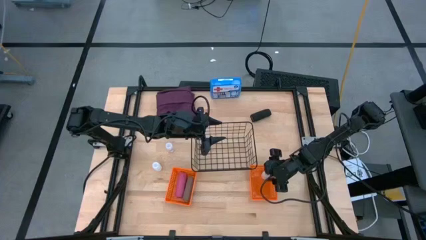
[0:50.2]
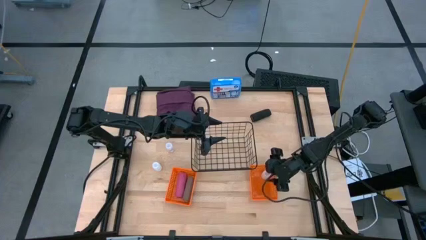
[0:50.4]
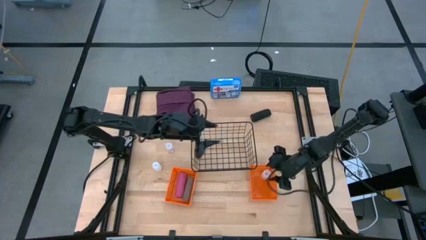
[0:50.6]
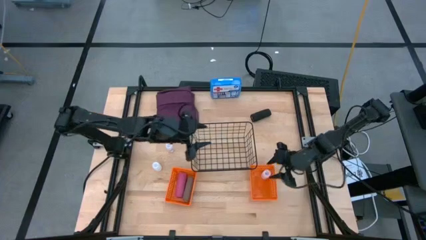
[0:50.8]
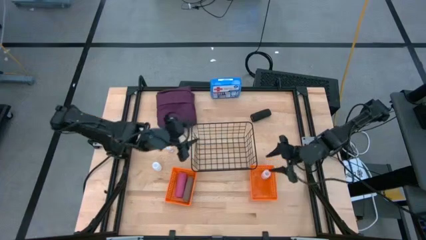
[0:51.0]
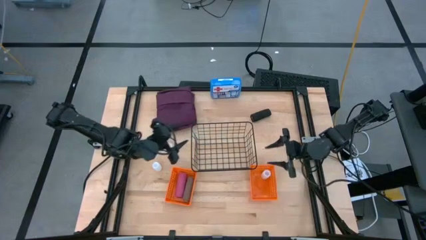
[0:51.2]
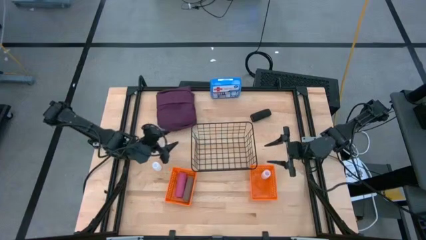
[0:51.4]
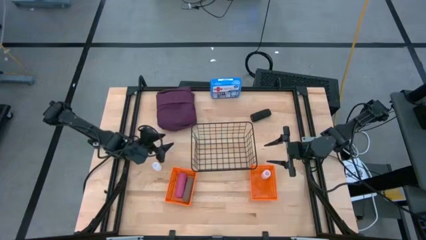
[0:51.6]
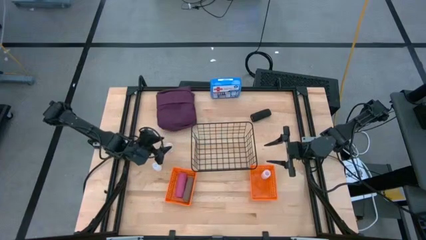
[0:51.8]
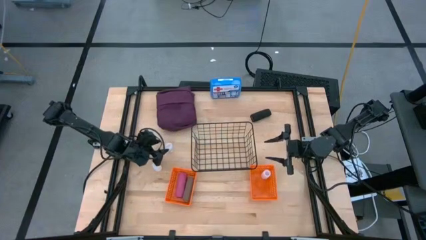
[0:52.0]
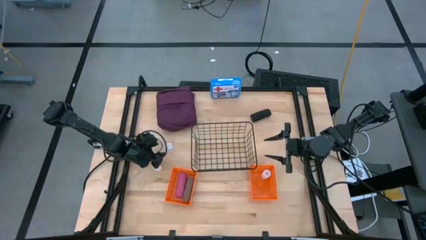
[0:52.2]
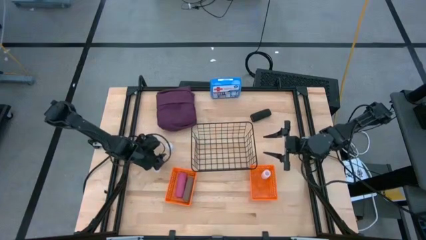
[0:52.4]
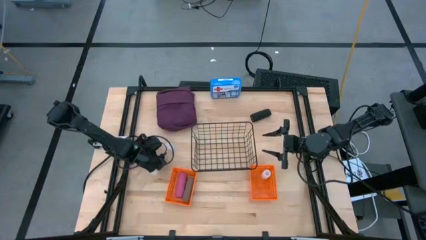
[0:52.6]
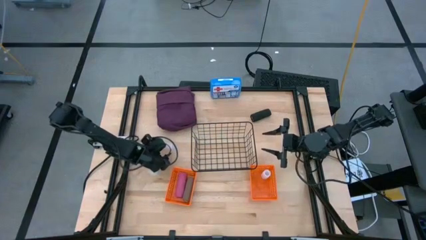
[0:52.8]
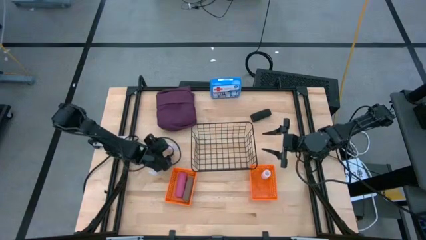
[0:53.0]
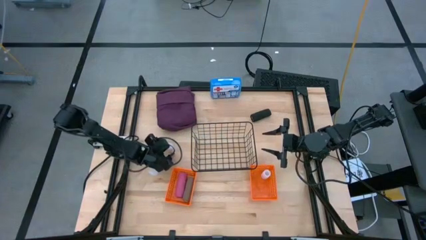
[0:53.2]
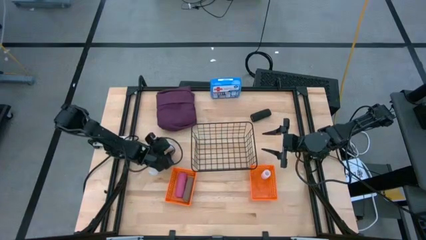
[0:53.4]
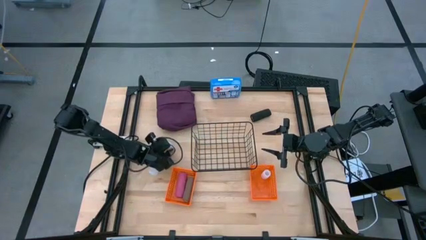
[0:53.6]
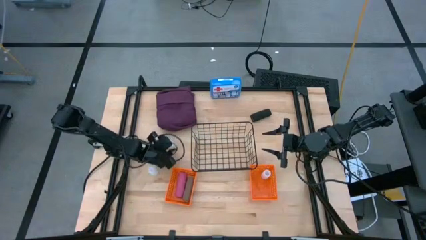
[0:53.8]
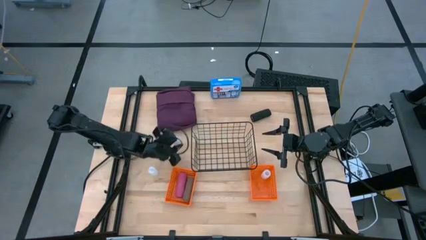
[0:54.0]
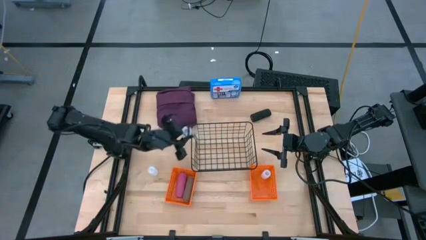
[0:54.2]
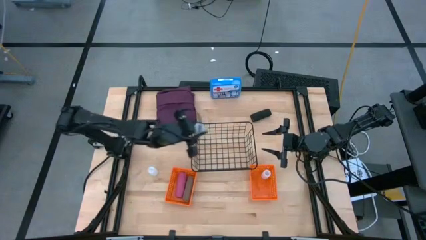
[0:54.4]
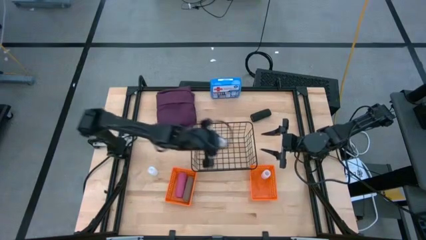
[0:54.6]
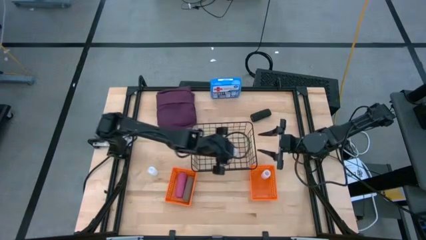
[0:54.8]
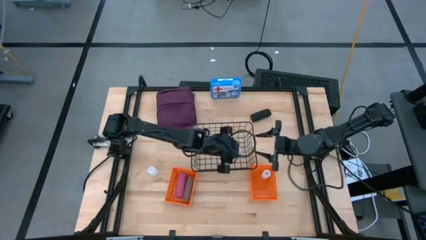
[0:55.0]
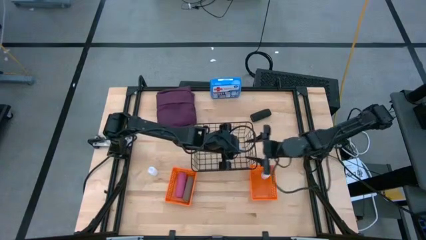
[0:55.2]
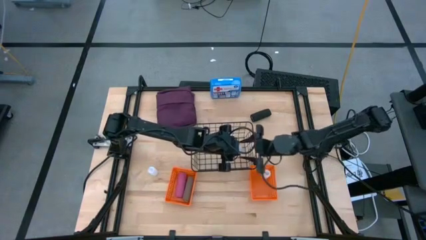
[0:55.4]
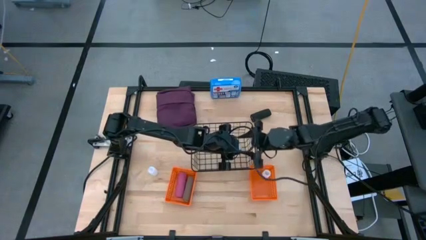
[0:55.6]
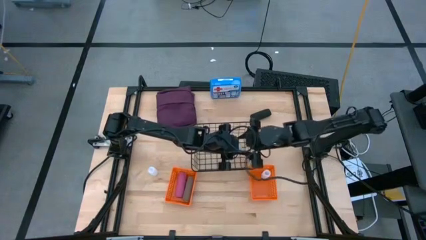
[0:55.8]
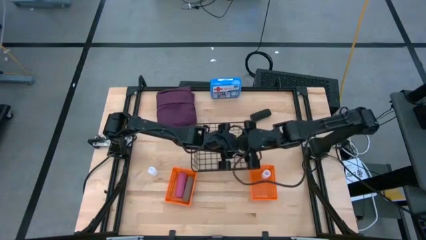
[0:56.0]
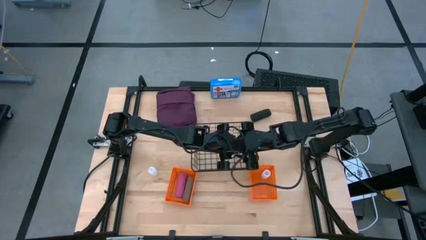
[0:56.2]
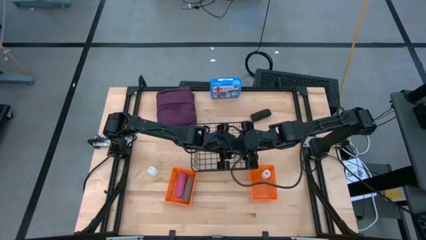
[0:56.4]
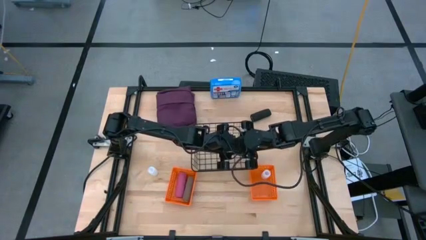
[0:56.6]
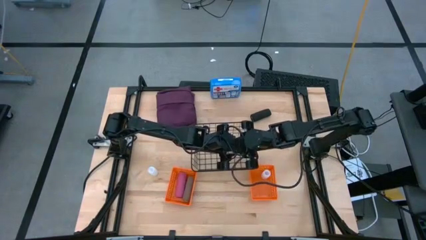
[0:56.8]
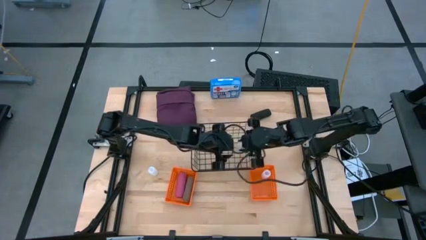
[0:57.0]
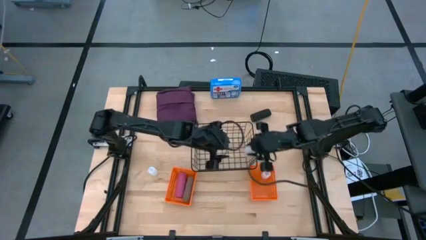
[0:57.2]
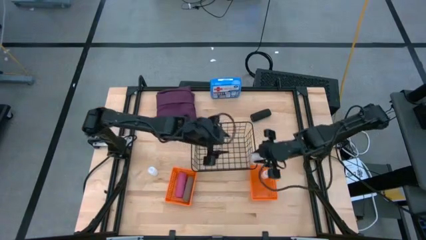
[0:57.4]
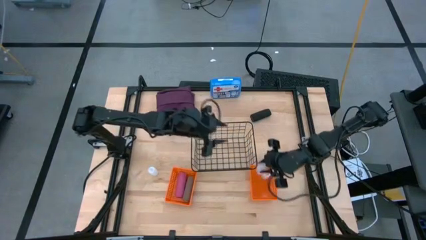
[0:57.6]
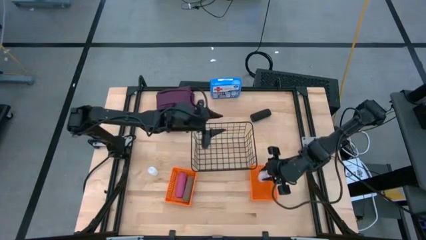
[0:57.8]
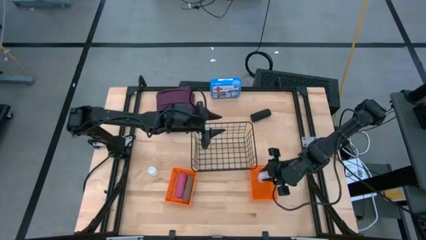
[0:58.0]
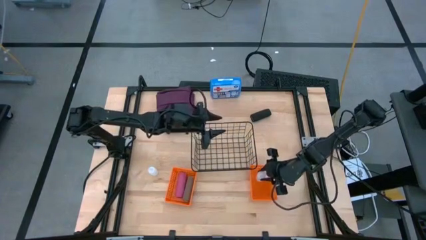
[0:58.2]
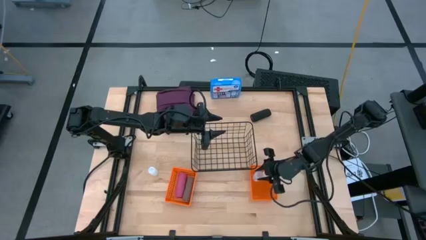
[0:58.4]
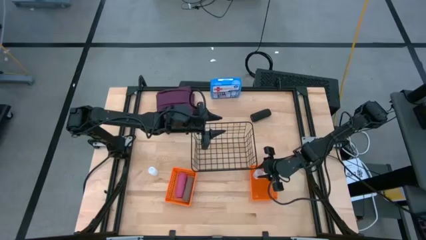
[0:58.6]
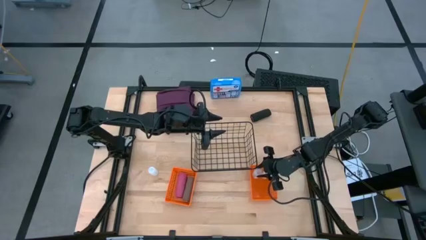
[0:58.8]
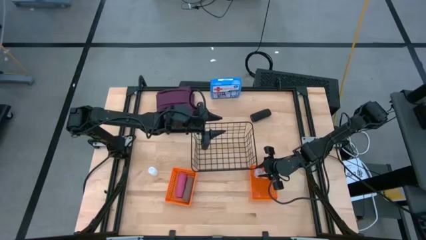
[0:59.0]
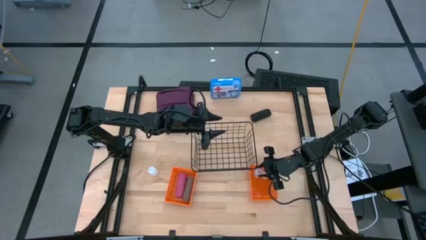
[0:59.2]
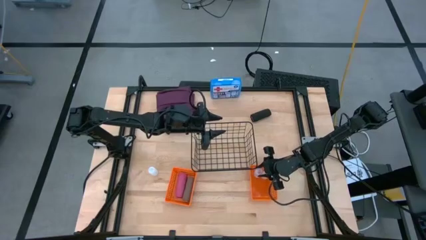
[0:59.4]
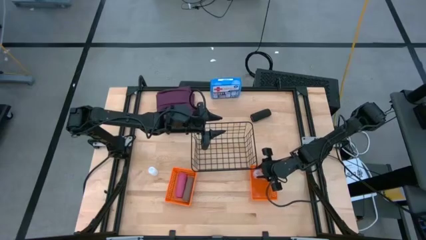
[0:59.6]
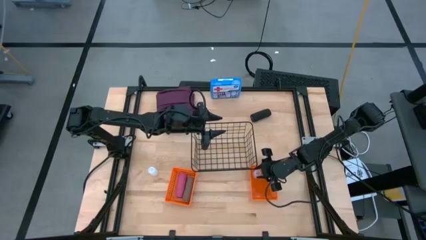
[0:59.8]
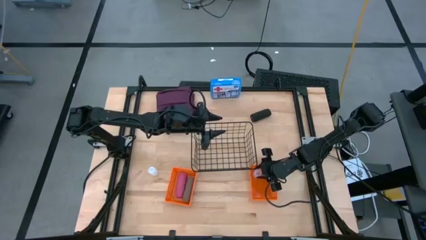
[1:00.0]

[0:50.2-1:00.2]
Task: Pick & Place Medicine items
Put the top white pill bottle into the right orange basket

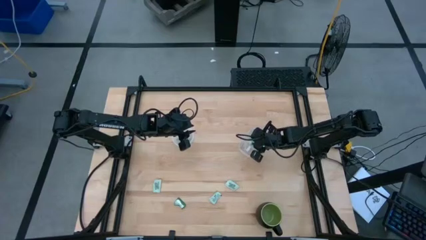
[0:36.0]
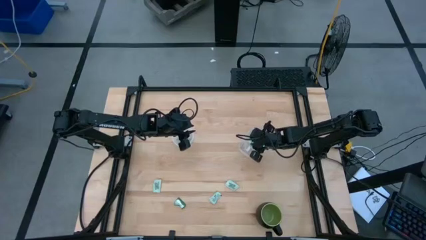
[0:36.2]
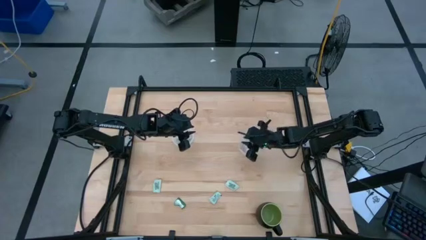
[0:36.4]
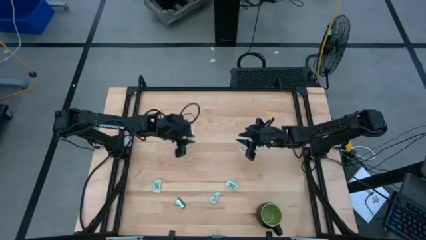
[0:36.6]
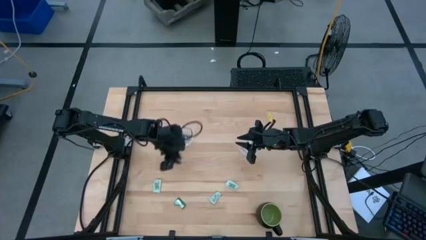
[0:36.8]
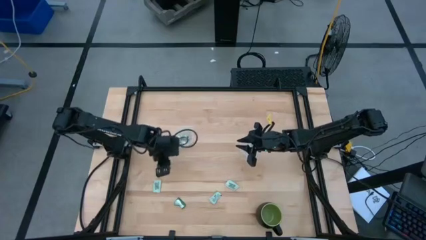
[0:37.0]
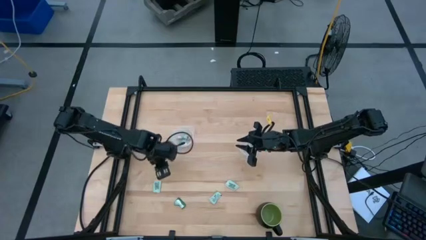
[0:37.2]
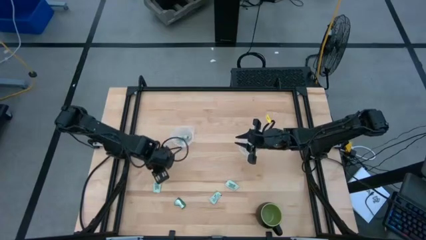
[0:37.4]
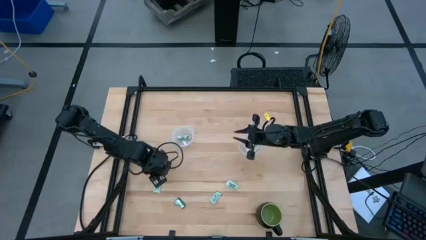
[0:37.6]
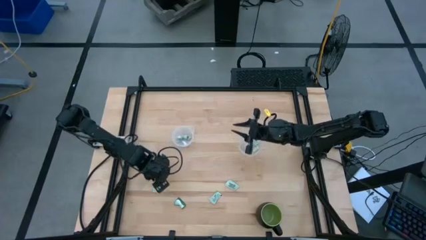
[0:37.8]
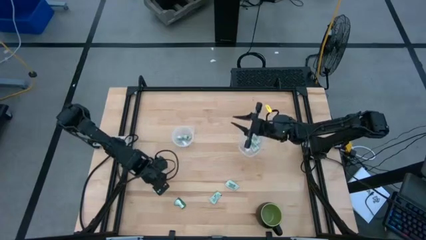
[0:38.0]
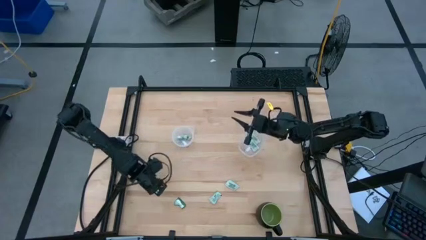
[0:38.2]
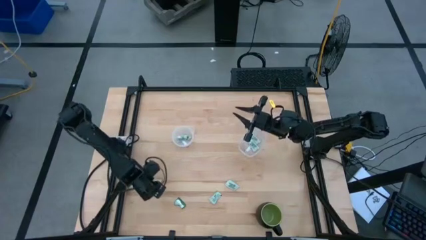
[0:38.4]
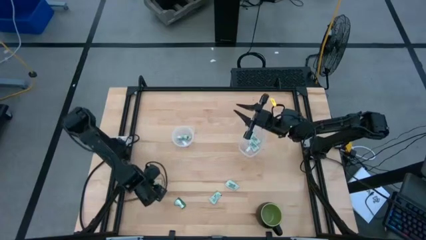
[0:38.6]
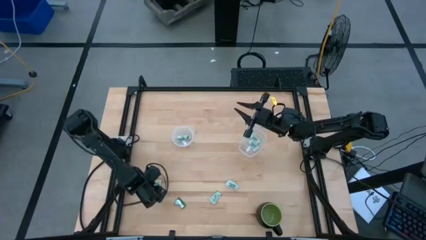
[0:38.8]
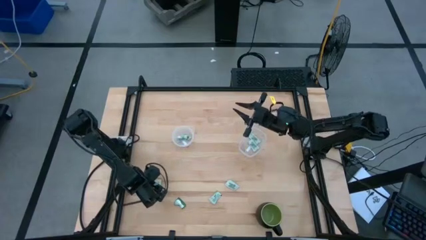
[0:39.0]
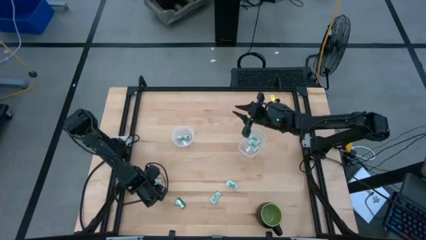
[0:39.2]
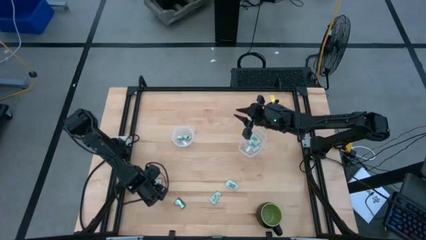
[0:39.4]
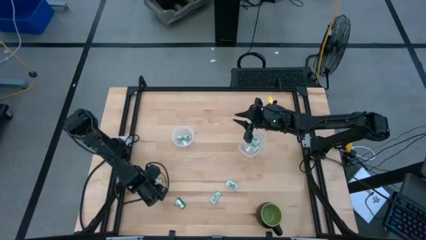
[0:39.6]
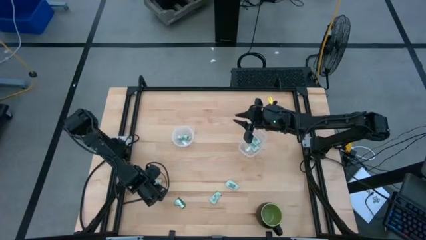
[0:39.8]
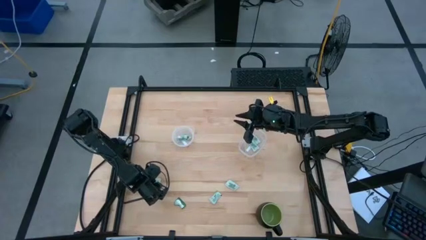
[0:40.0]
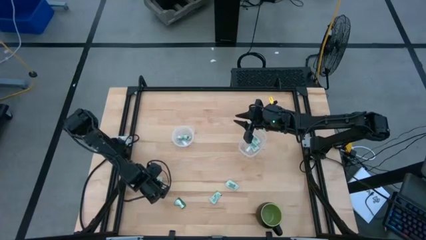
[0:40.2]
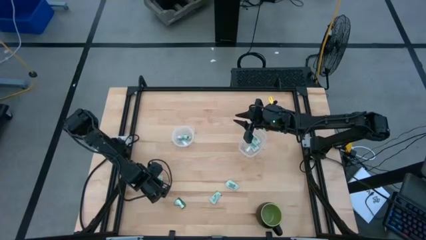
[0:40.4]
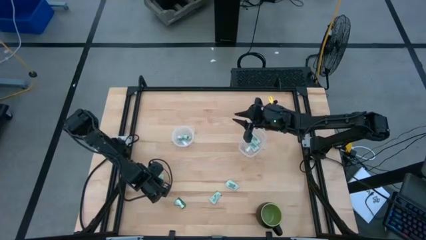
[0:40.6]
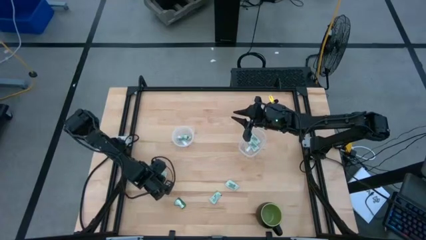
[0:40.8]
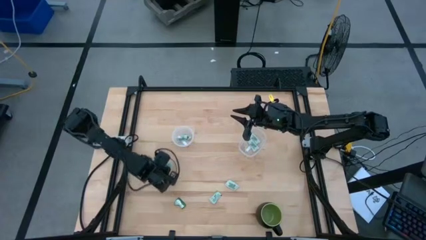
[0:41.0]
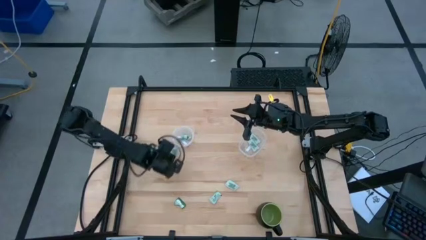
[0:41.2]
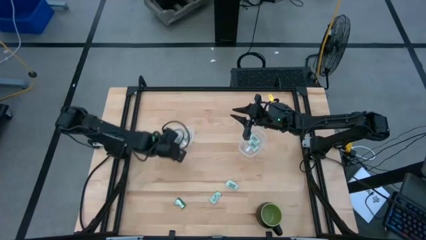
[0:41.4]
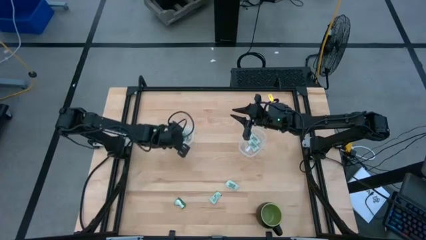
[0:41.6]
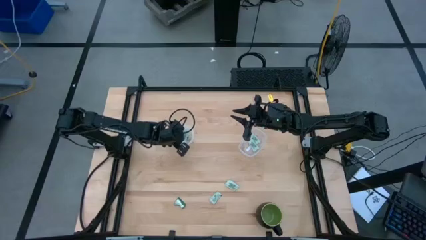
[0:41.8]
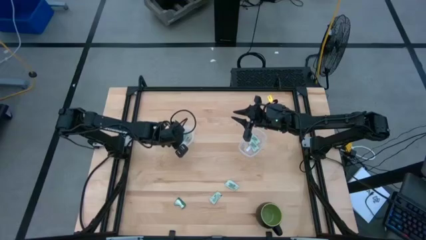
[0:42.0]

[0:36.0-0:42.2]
Task: Pick and place Stevia / Truvia into bins
Put the white stevia packet into the left transparent container
